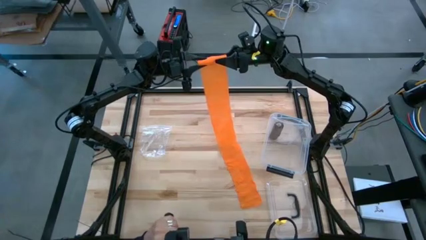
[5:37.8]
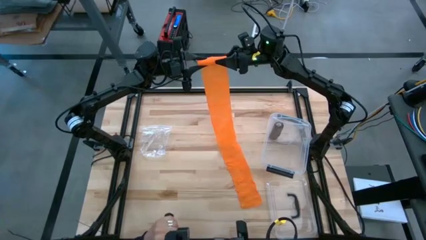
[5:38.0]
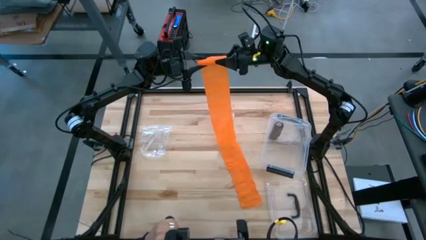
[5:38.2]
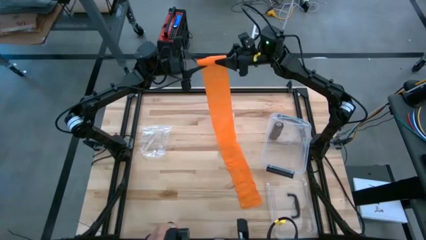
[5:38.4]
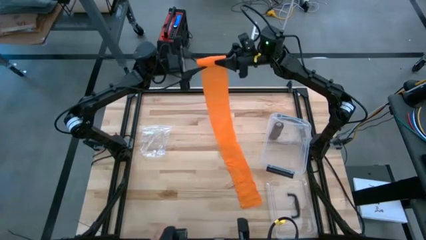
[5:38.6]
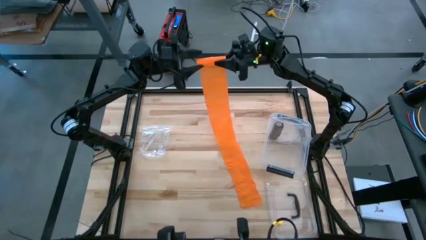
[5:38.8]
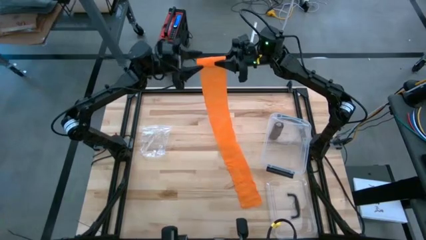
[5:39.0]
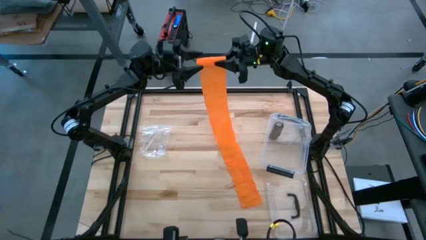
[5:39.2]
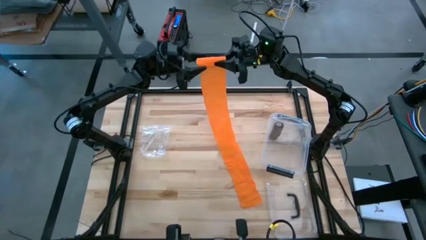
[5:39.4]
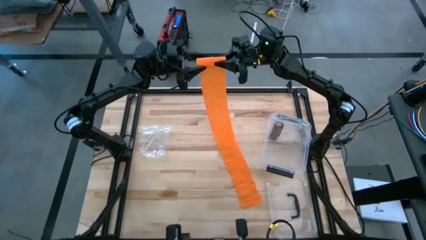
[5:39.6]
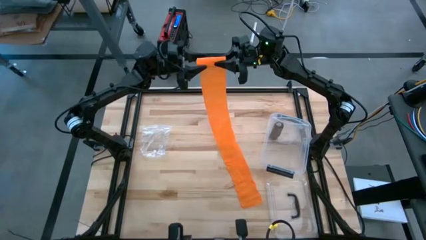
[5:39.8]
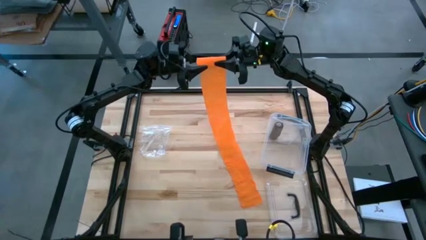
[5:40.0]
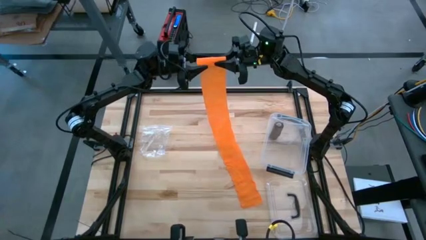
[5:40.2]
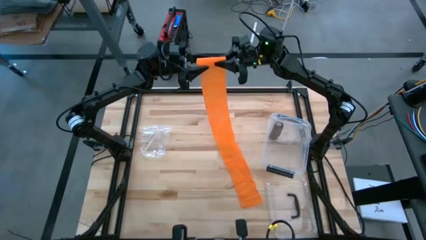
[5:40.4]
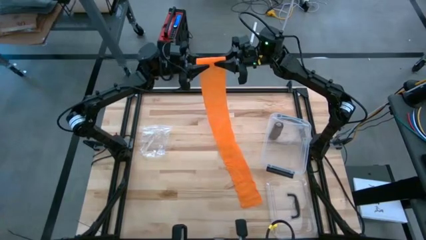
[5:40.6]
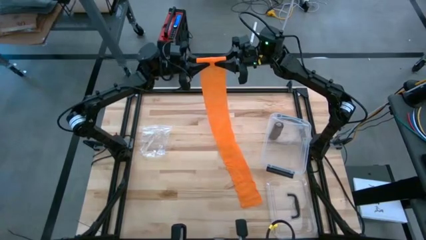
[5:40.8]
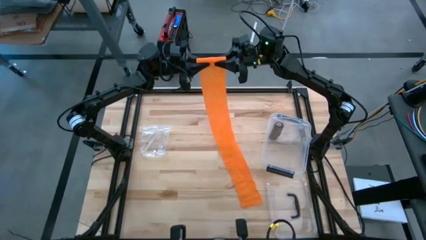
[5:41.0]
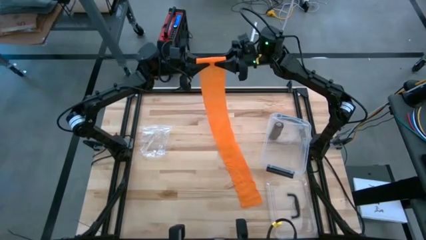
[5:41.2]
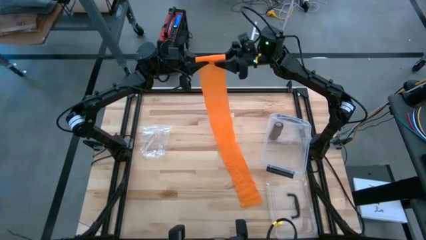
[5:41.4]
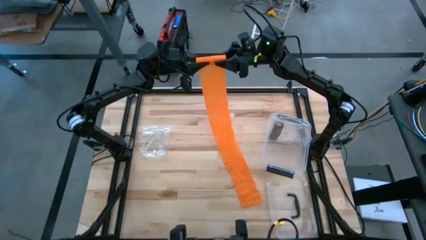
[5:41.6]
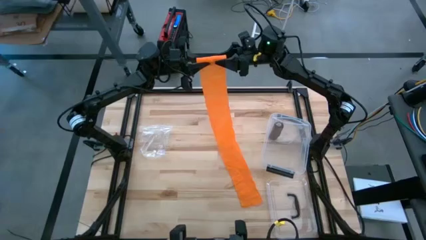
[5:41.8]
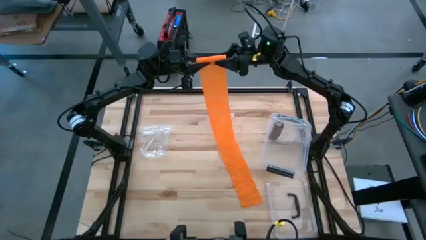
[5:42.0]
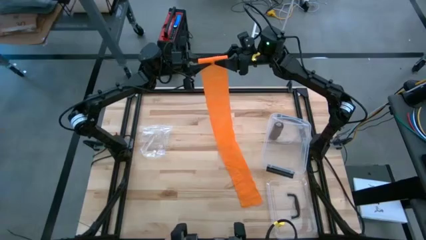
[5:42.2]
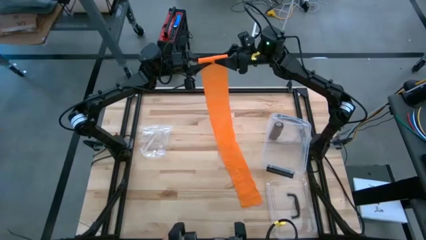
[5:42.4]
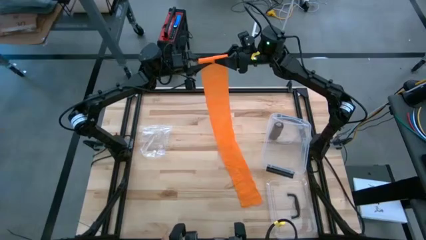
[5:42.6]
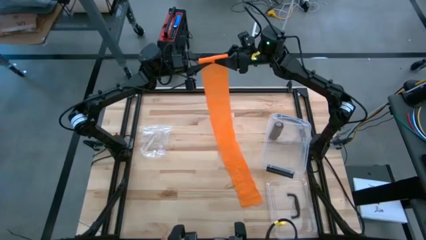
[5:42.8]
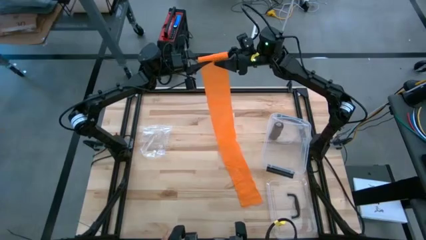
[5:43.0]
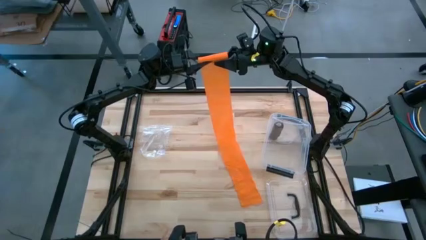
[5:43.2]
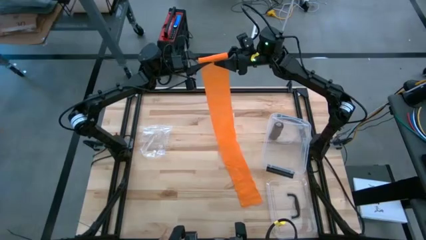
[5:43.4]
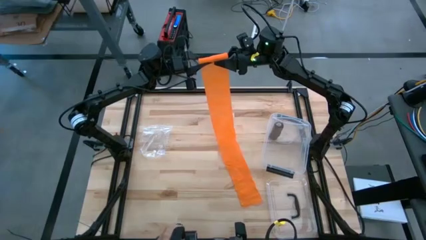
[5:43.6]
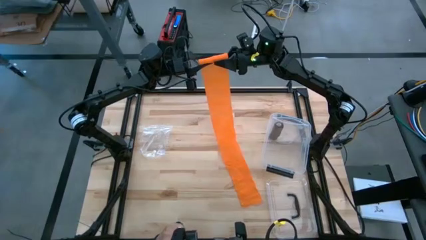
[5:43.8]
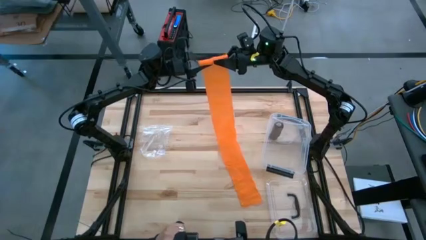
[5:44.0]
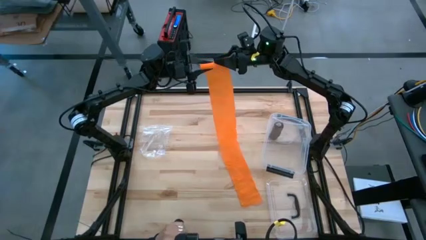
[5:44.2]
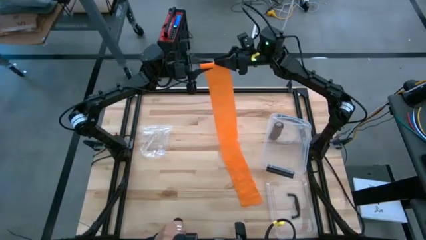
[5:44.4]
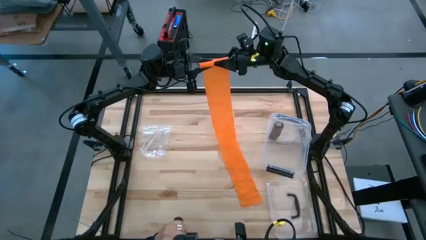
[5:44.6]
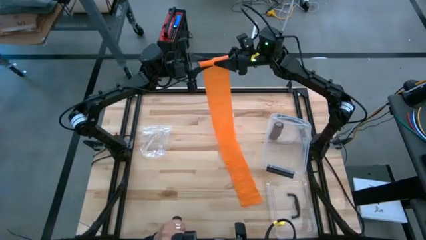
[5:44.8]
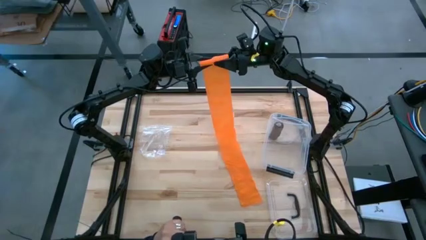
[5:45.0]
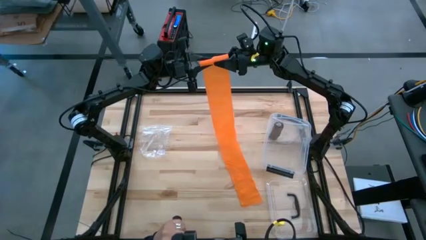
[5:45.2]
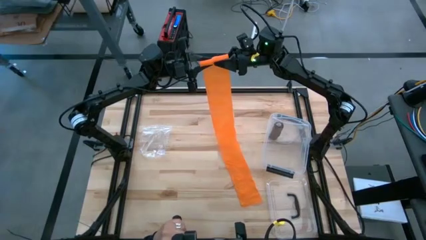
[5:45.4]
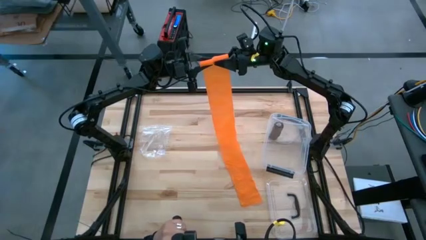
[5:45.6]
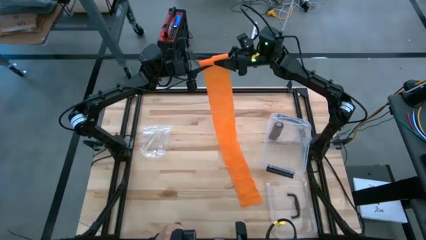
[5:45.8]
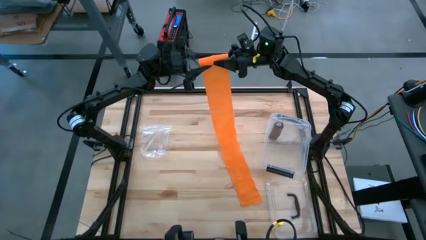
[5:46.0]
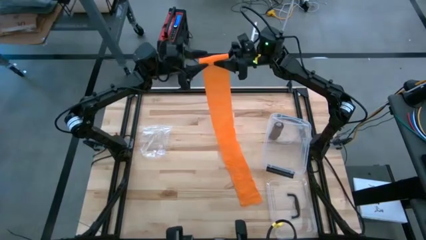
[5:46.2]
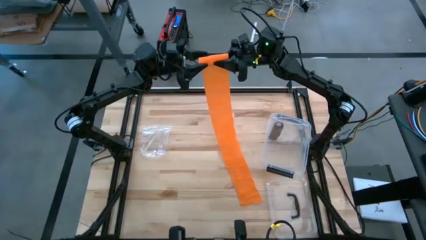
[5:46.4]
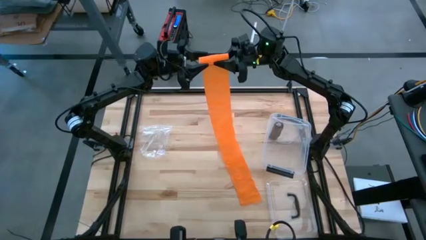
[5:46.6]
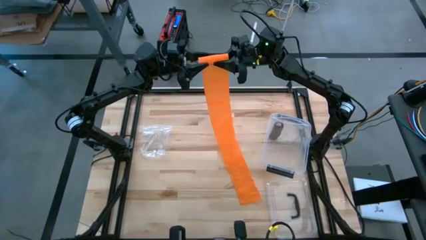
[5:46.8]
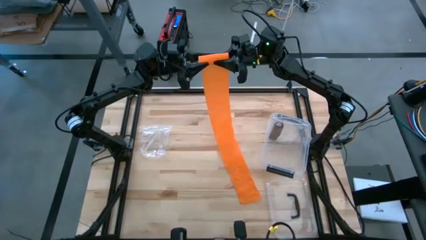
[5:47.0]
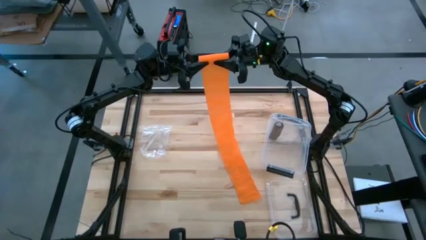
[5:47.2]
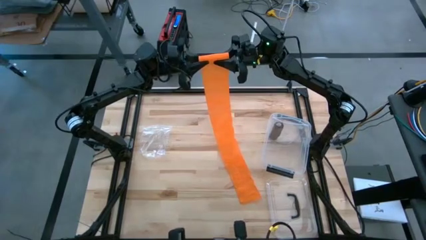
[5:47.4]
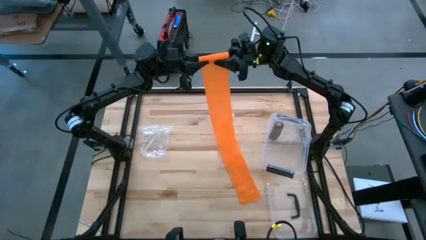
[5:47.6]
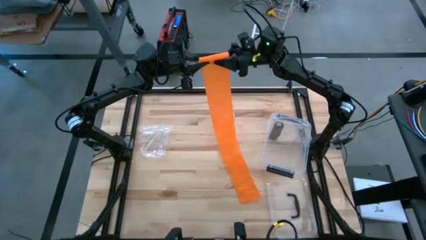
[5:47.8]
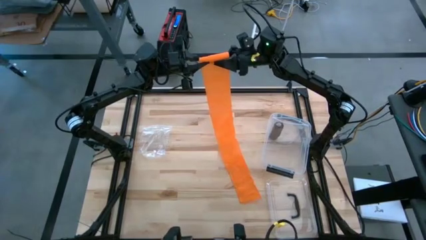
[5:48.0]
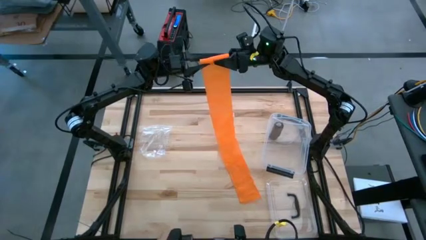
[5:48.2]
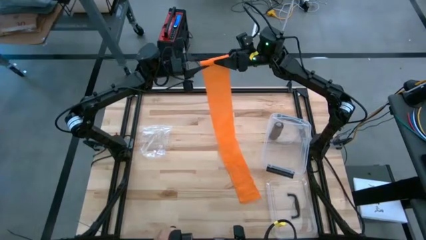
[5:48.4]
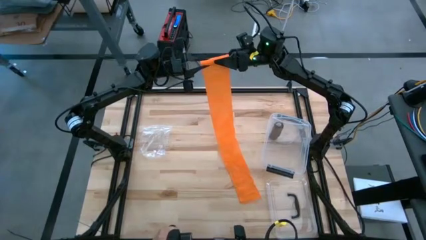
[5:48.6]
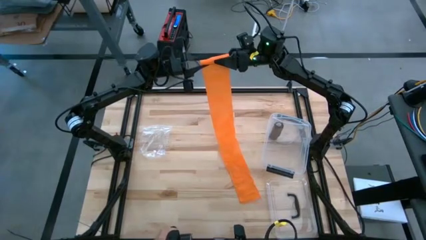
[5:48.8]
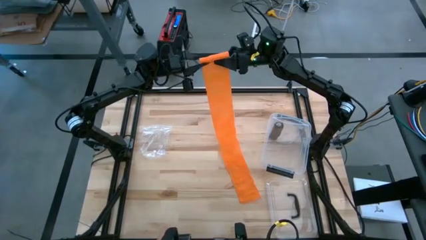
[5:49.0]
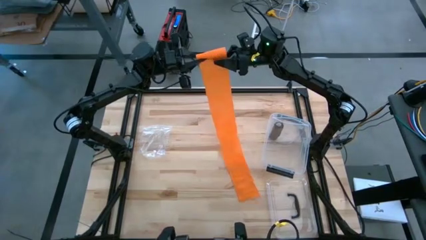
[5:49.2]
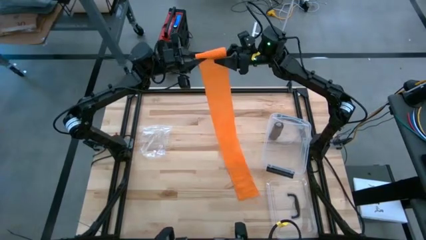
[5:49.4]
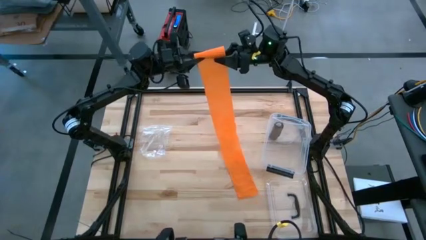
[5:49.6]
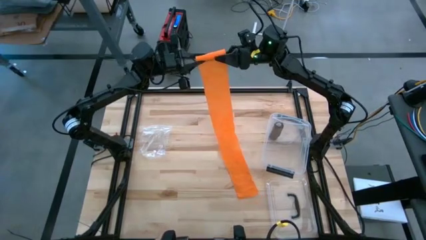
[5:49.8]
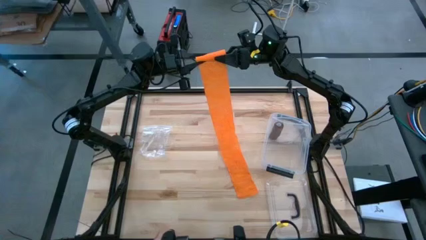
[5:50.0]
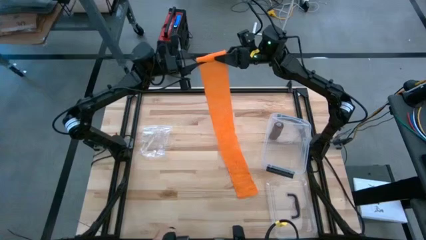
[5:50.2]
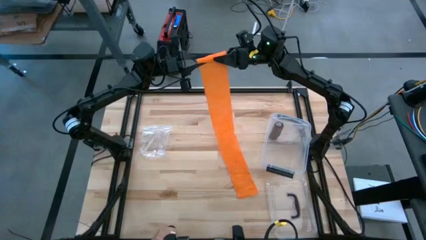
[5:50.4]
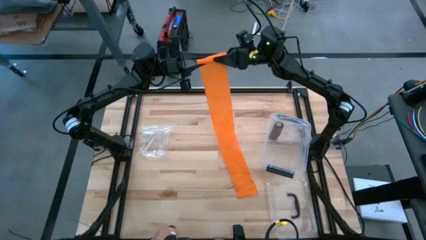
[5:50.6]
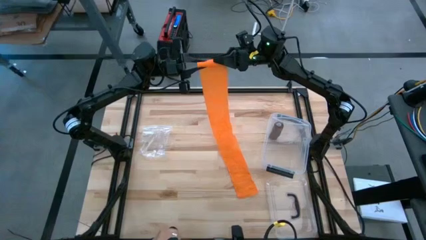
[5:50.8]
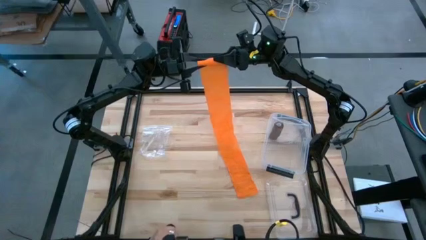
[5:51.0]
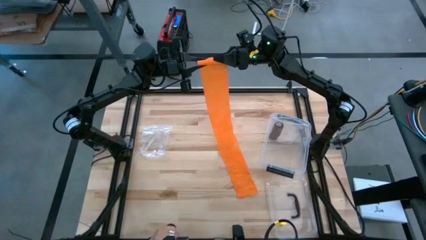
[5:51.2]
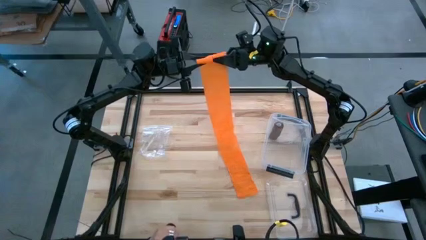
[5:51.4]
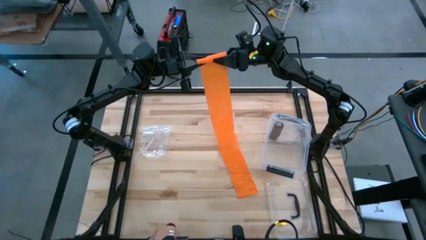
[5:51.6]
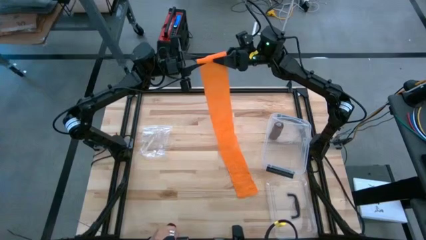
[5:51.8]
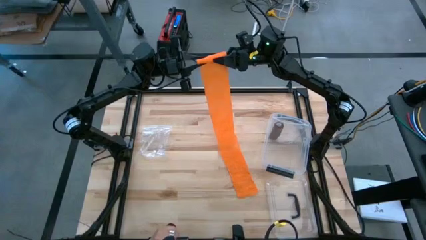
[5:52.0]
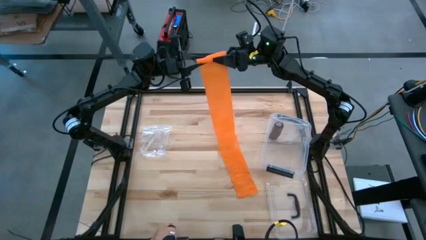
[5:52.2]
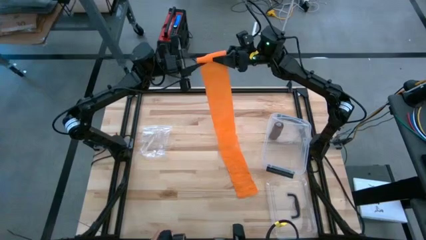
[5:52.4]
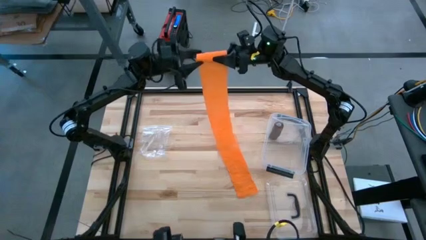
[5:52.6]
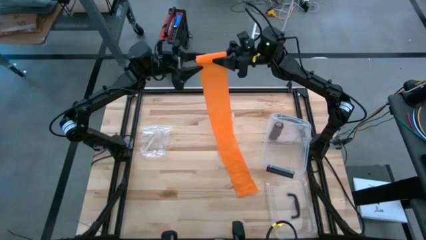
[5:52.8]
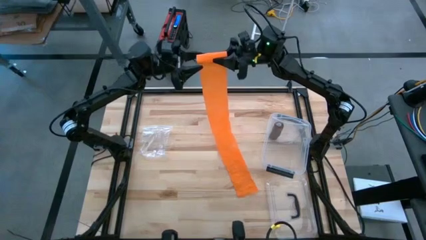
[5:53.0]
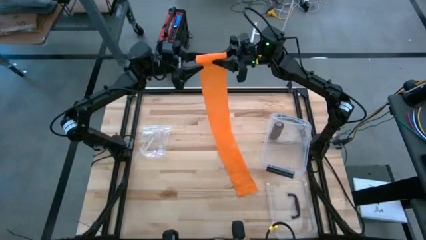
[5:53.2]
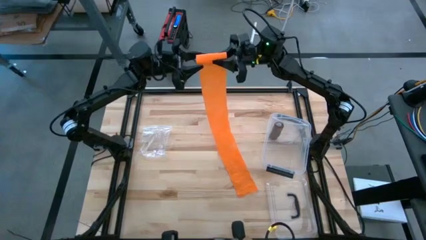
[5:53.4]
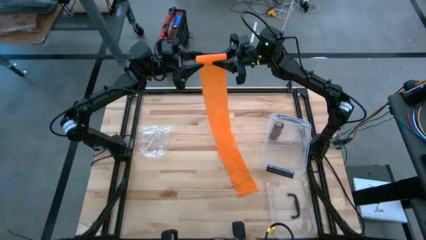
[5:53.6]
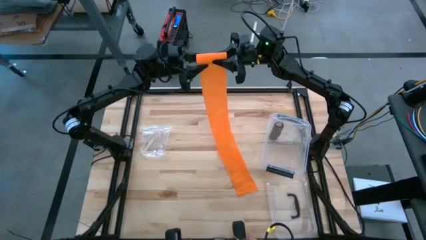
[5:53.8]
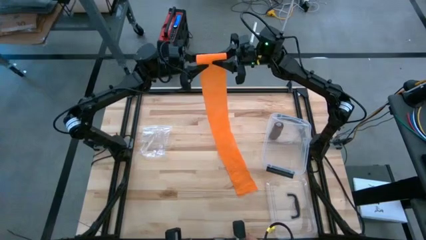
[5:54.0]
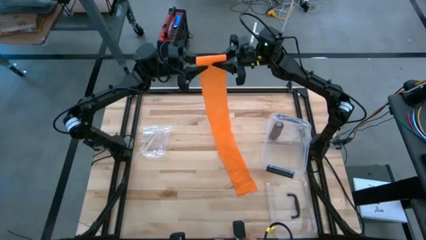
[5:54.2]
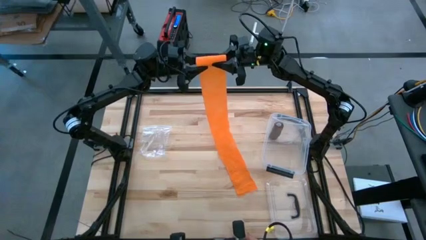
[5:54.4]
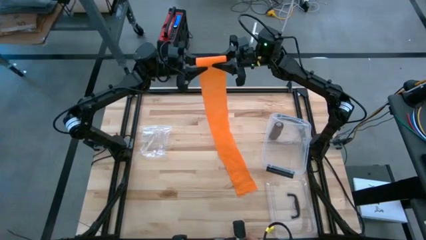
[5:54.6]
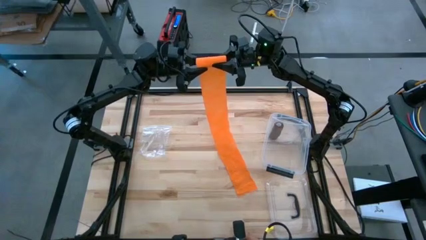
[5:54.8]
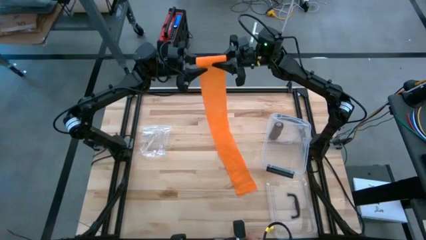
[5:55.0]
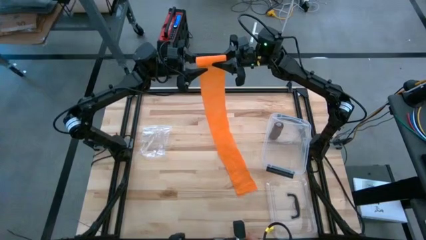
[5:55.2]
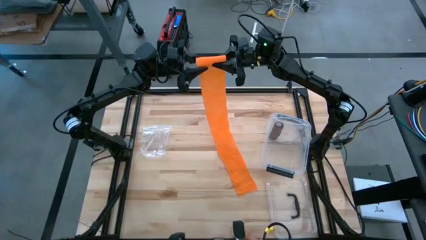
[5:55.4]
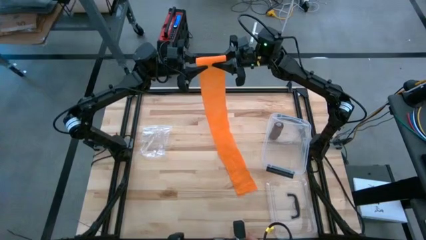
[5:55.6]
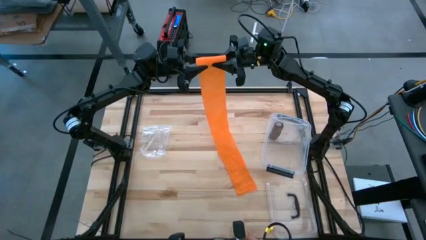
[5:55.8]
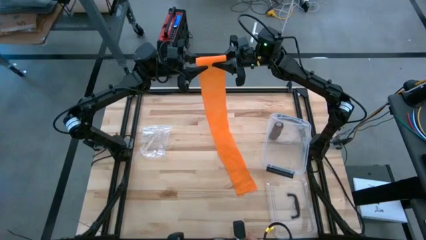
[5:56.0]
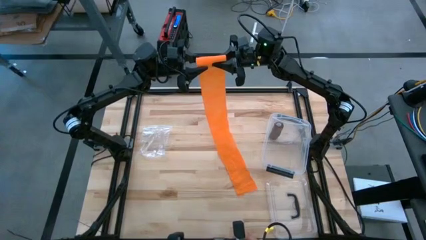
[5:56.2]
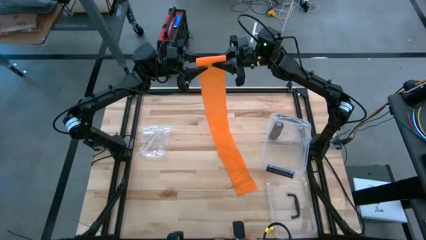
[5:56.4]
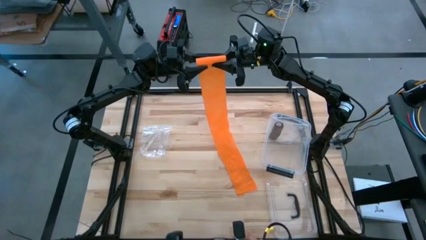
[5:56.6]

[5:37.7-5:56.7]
Task: Roll bandage
Roll the orange bandage
